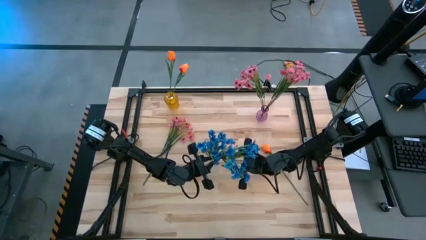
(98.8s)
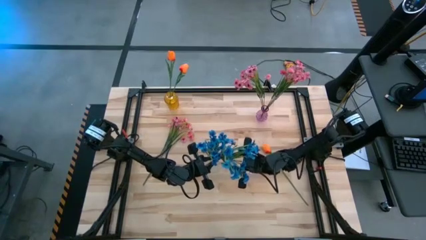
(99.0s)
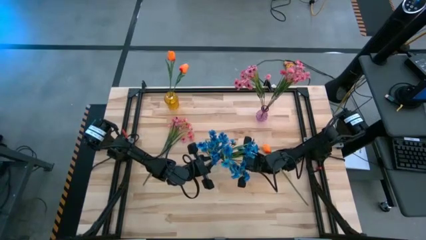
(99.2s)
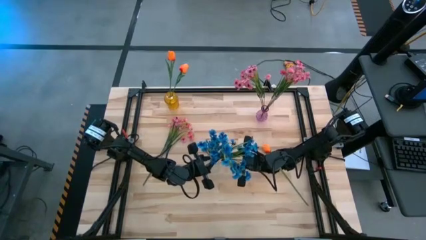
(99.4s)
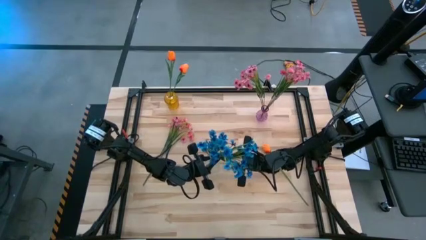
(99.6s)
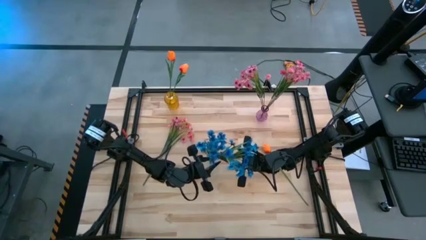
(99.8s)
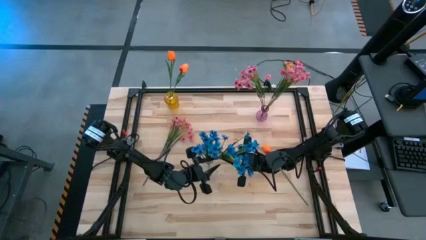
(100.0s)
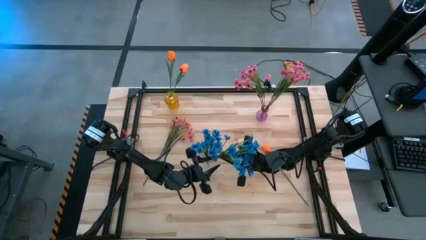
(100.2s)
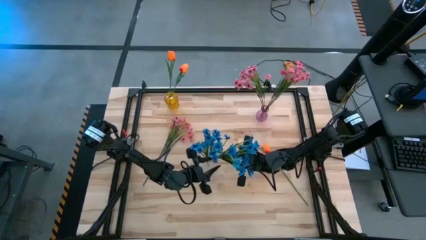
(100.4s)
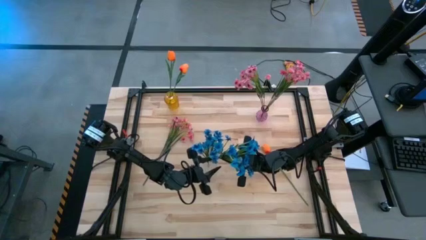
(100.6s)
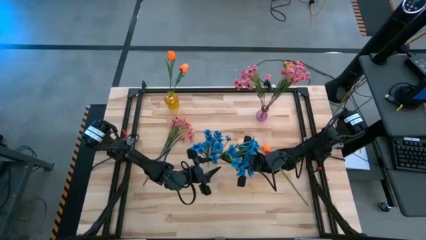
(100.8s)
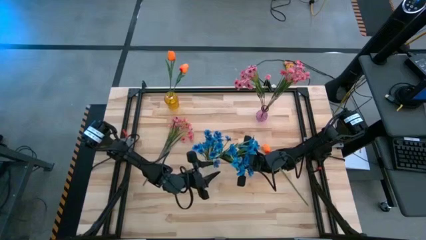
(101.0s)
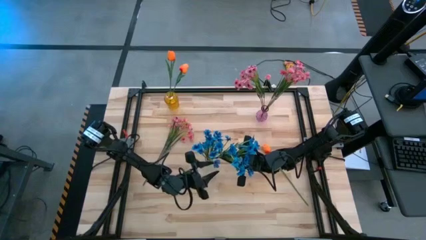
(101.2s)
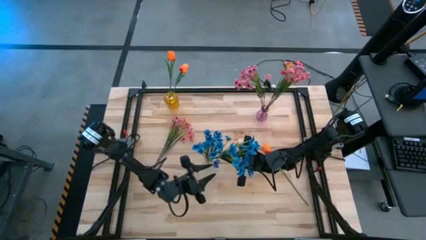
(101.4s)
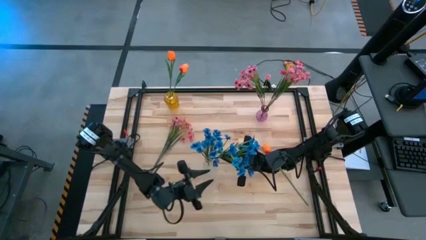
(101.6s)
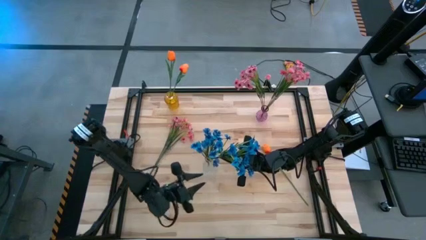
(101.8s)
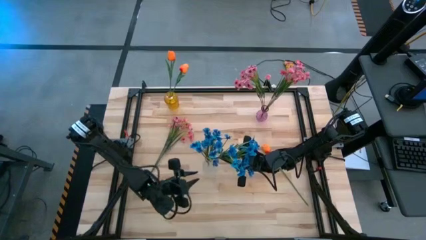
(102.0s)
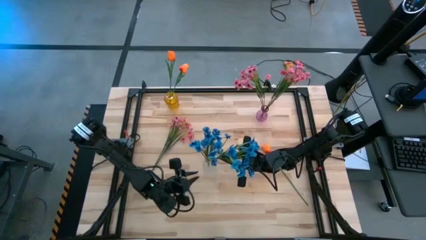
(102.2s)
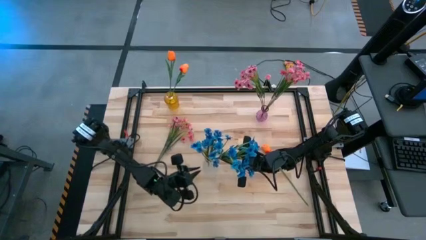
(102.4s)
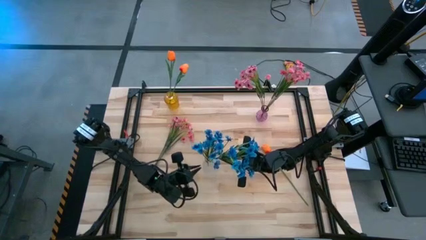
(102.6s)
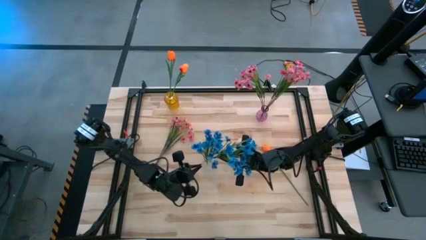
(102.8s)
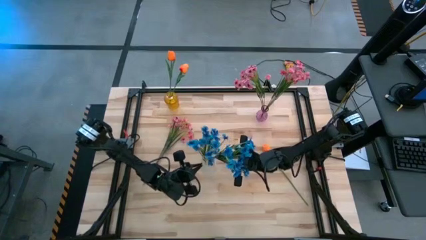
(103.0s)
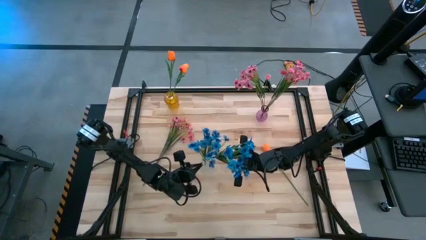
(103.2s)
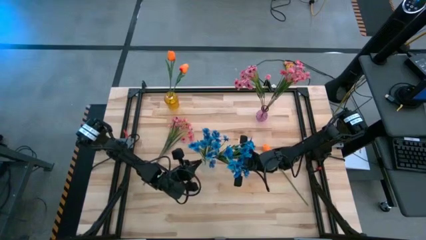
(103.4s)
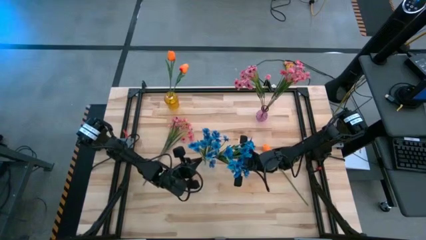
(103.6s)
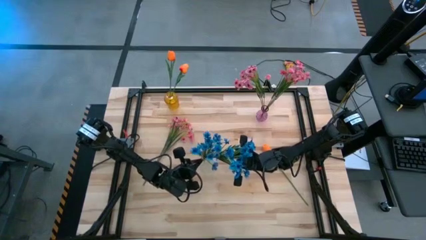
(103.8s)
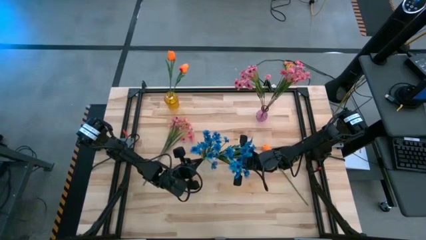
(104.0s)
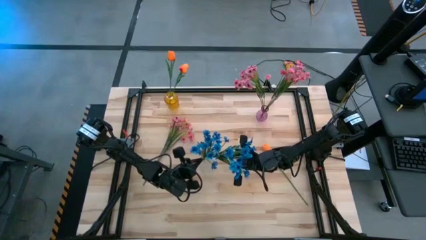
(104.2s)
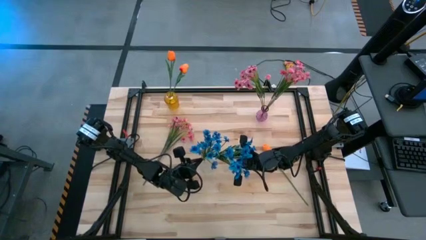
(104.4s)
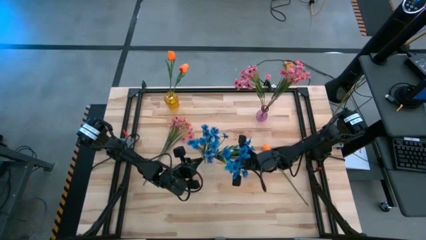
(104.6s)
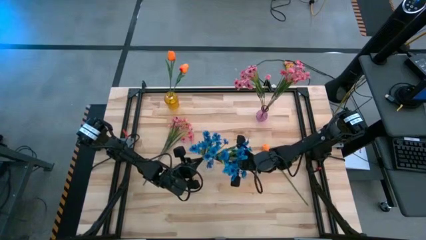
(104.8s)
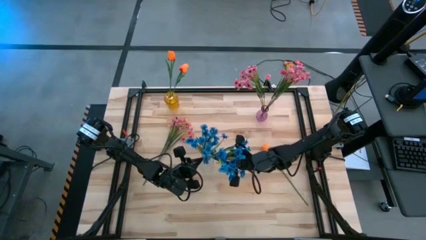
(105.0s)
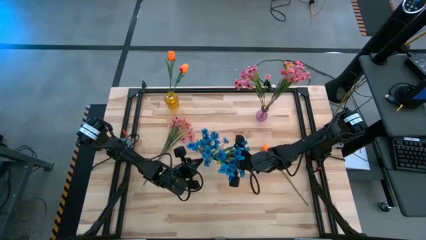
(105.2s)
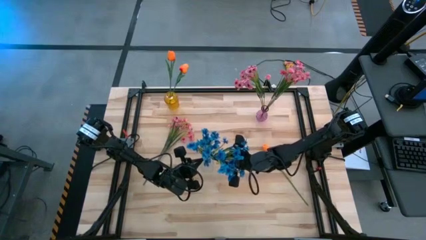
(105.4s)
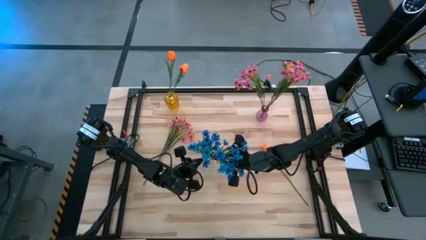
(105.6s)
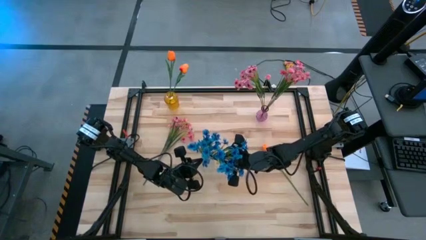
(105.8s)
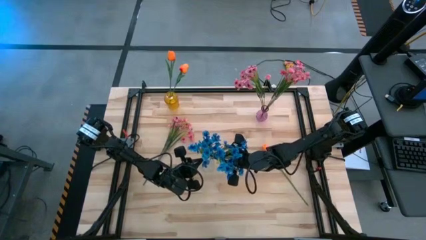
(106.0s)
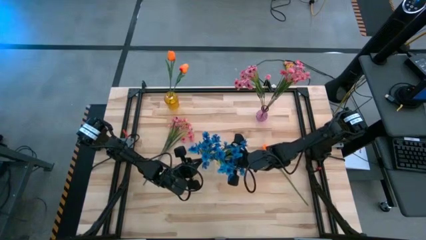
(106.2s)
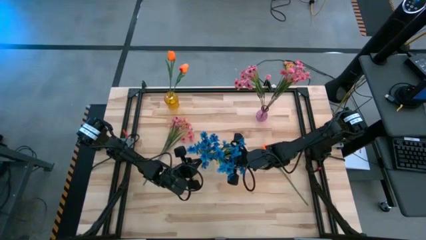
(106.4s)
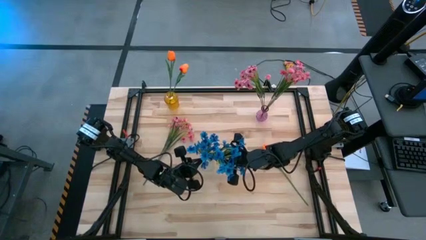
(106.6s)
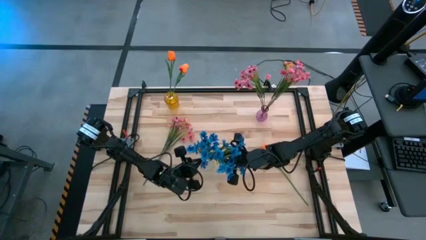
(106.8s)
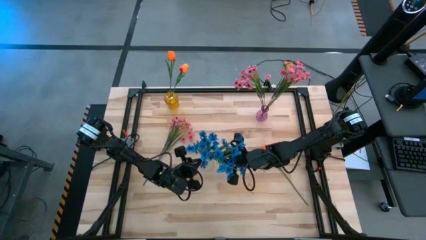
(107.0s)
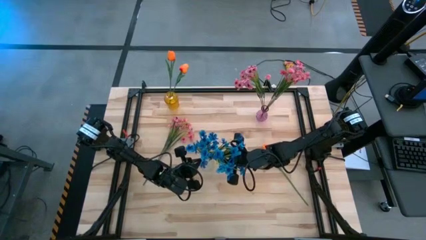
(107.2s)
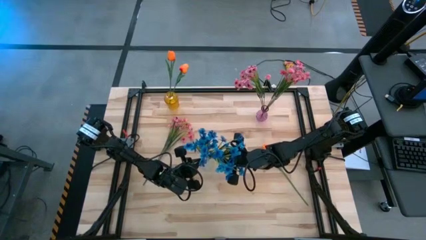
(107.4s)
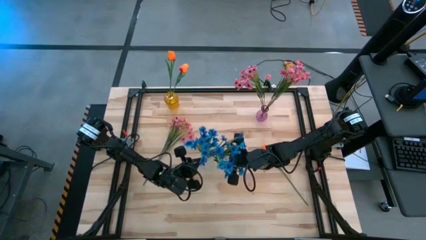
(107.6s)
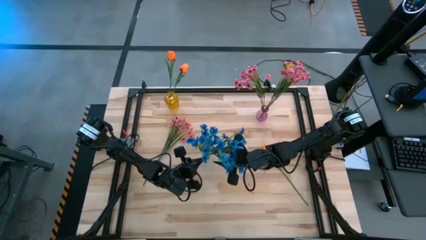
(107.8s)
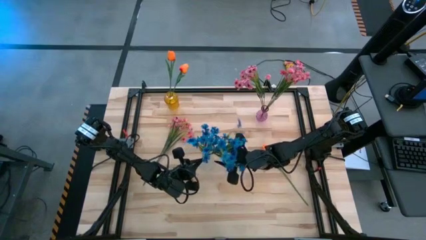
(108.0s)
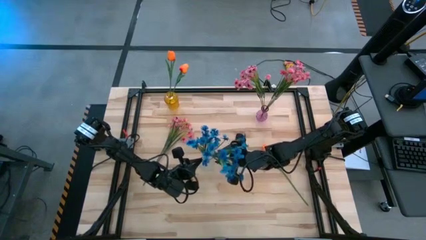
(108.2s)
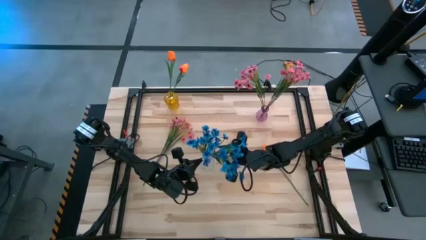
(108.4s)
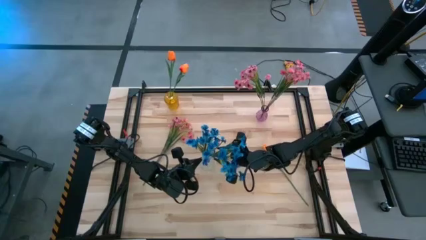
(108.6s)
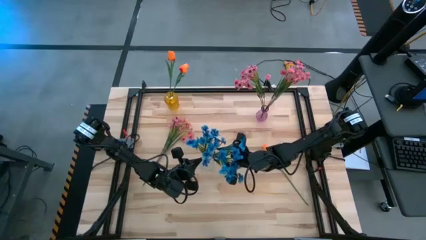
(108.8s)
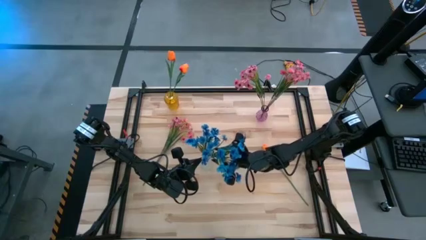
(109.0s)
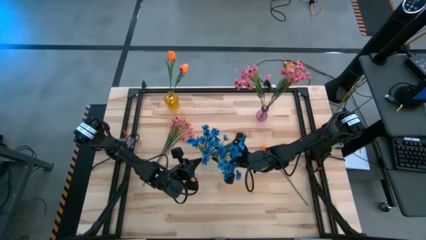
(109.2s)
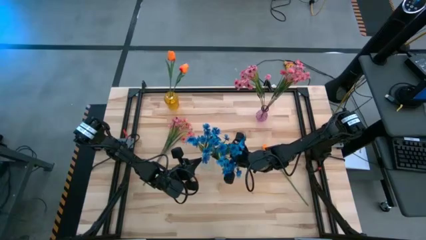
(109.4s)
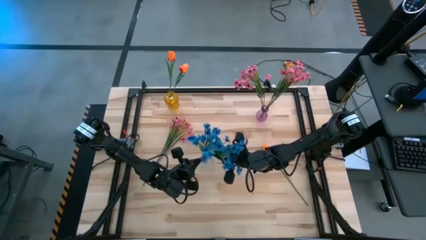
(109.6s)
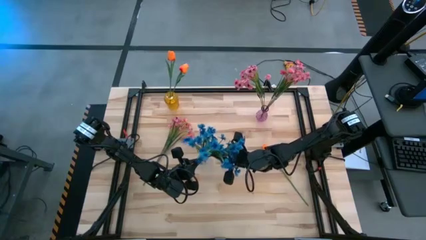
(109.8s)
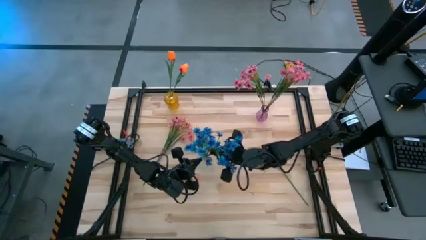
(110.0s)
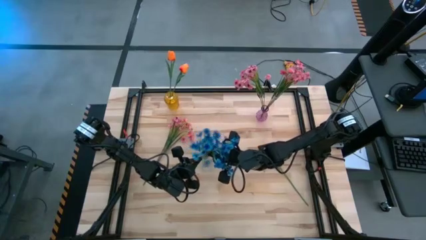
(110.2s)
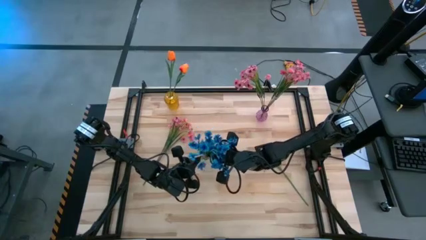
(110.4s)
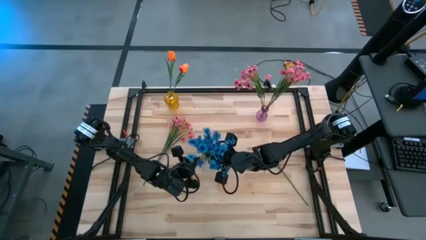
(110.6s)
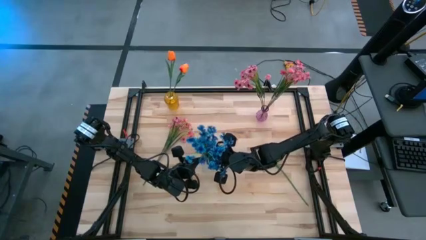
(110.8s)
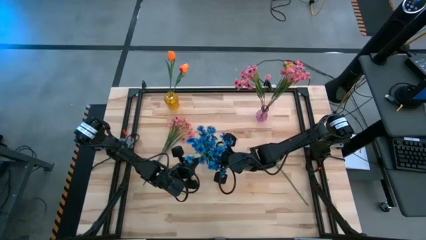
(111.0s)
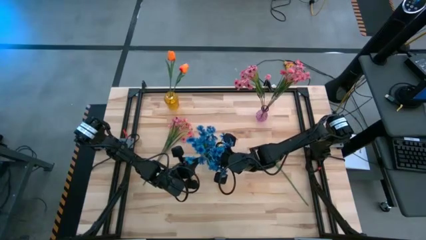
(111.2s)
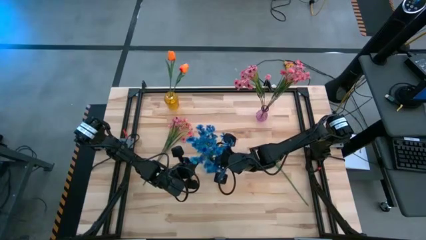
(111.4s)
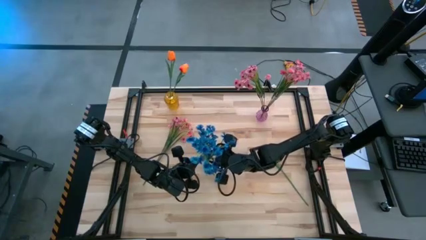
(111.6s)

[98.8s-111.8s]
Task: Sort flowers into vase by color
Put the blue flowers into the transparent vase

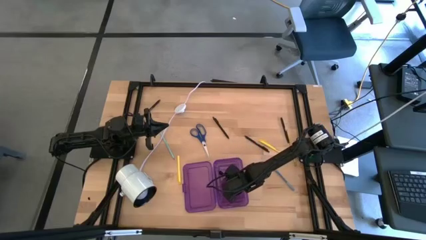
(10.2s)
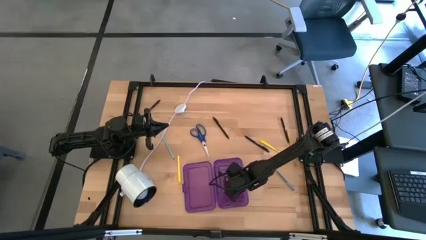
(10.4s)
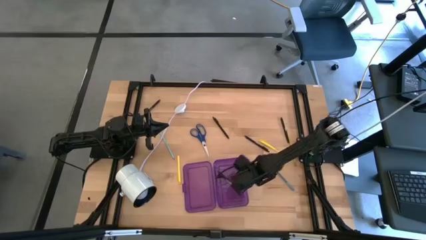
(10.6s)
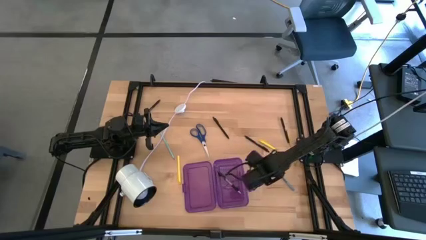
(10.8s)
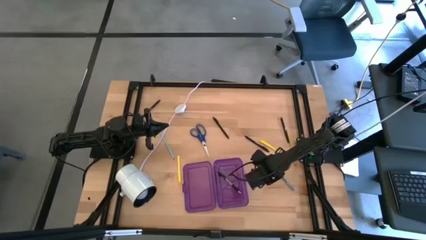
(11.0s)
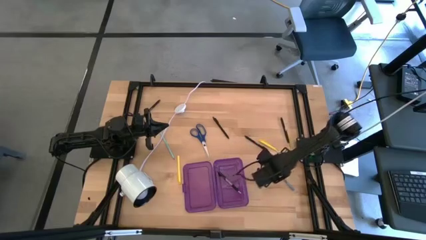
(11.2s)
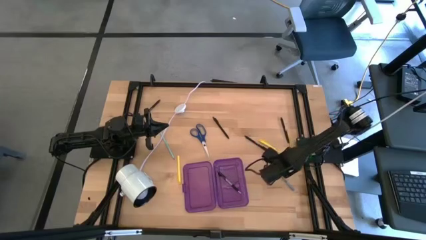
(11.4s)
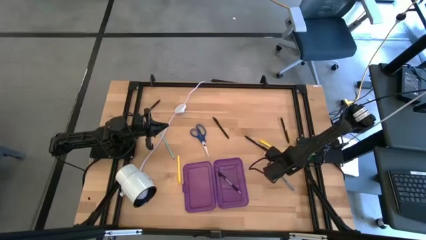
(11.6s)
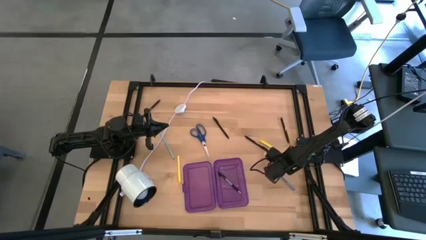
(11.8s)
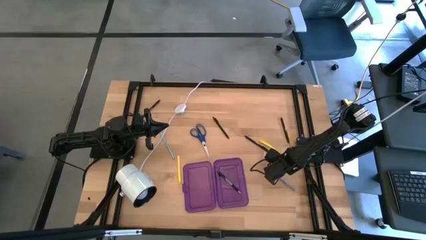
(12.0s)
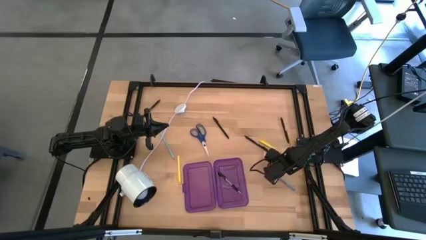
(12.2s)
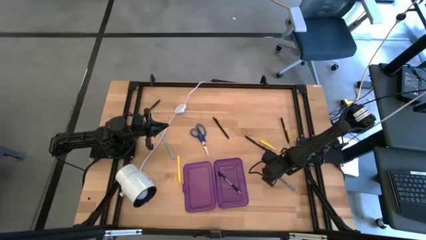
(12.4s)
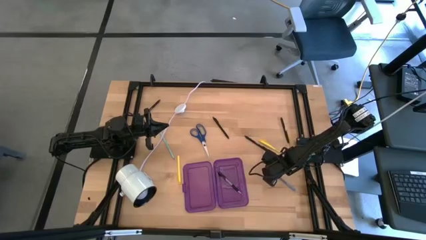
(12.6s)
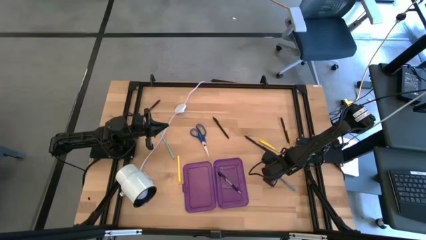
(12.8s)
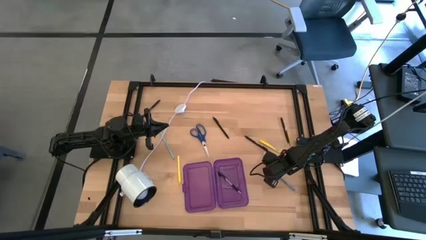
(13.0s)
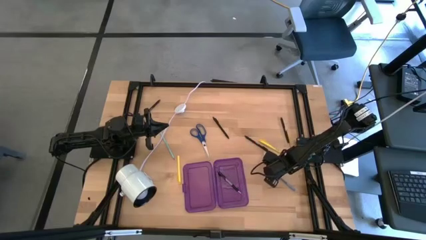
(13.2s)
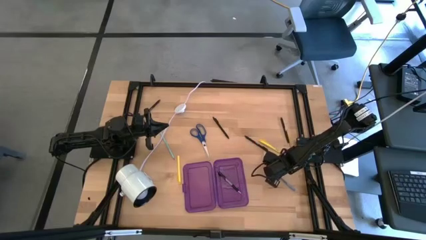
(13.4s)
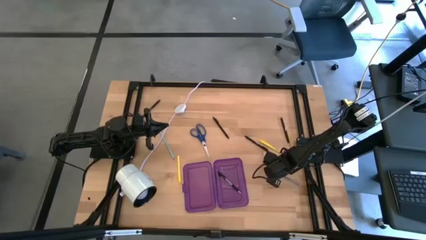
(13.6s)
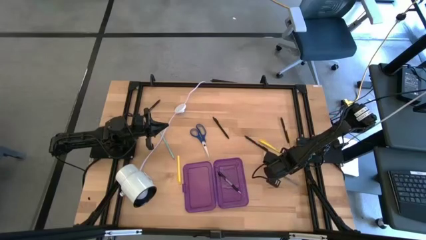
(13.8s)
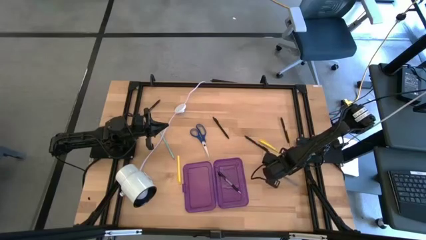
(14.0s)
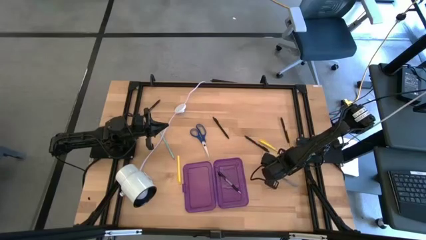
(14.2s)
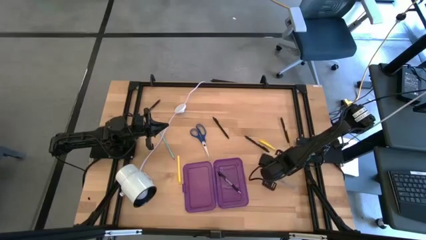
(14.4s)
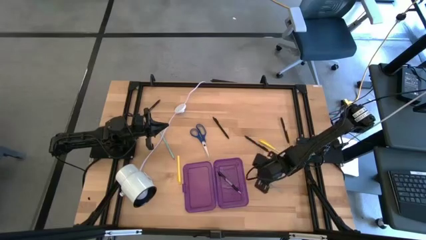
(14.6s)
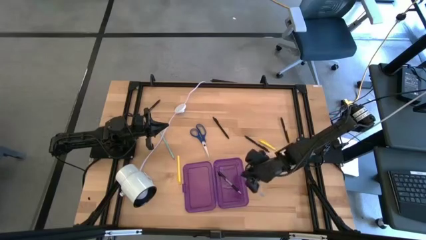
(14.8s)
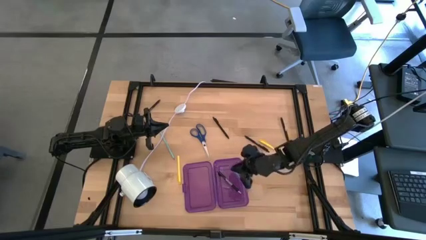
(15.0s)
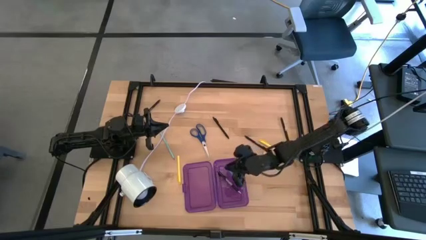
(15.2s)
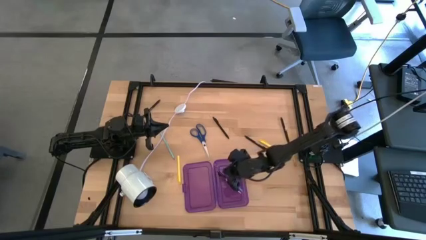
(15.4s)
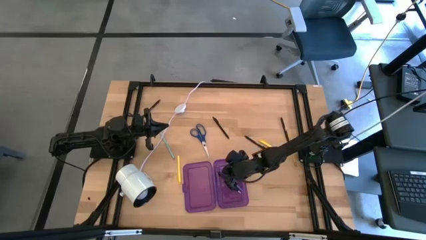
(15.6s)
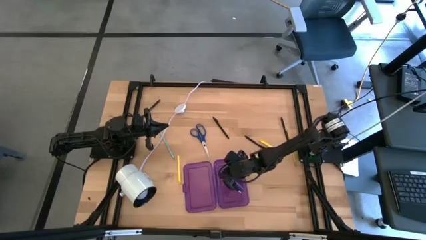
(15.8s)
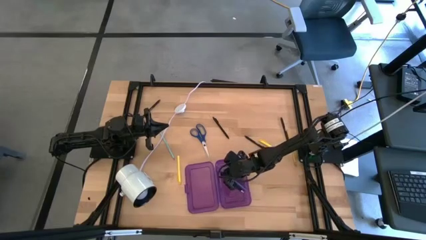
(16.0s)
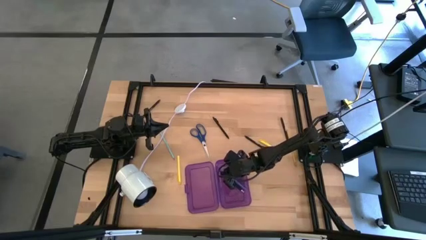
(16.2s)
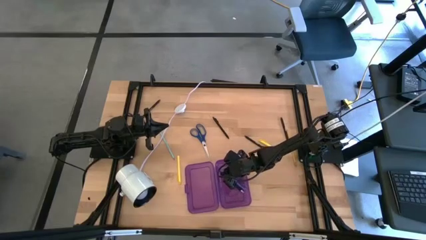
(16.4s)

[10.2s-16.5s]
Task: Pick & place school supplies into a supply box
Put the light blue pen into the purple supply box
